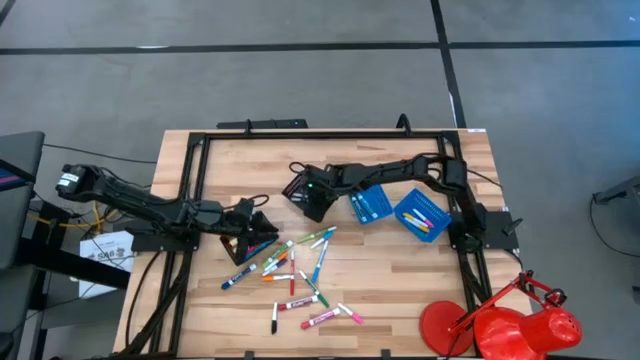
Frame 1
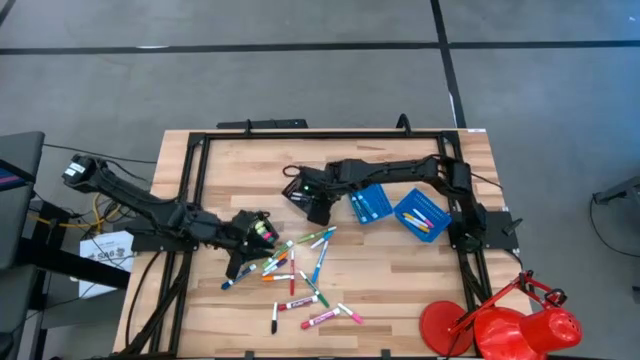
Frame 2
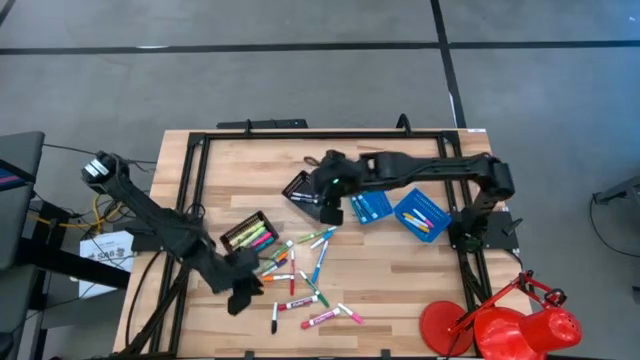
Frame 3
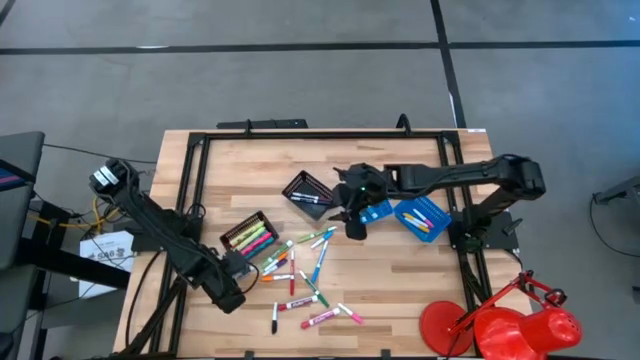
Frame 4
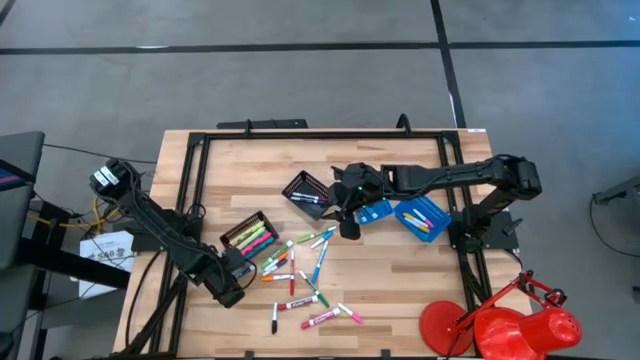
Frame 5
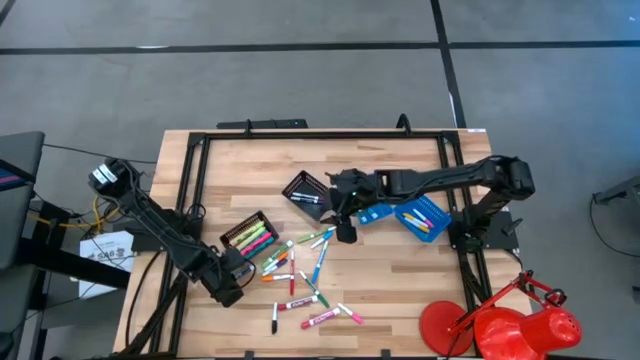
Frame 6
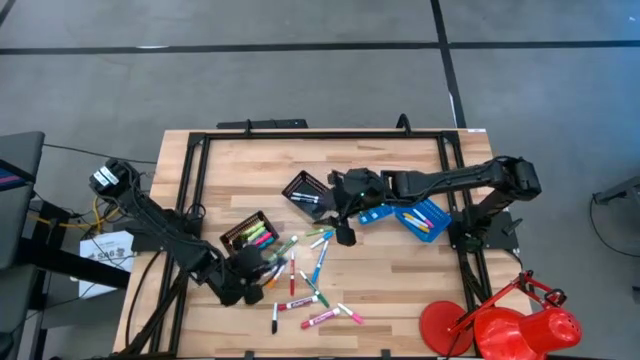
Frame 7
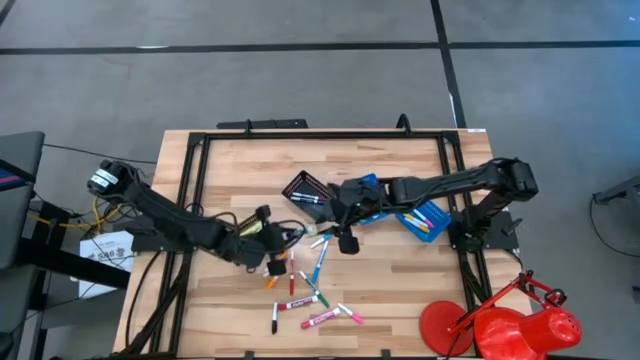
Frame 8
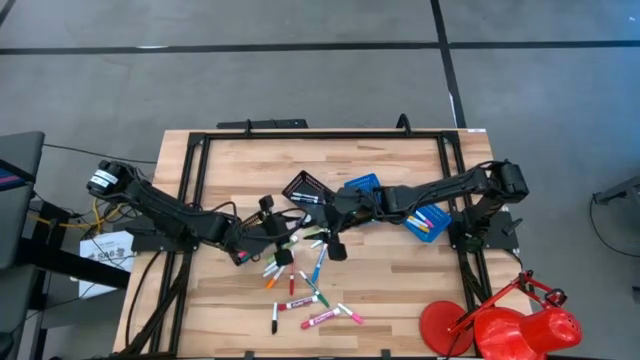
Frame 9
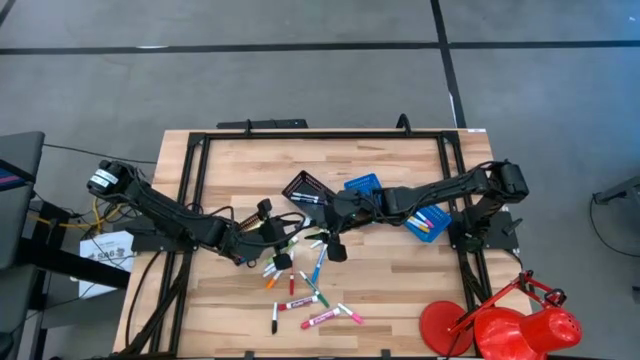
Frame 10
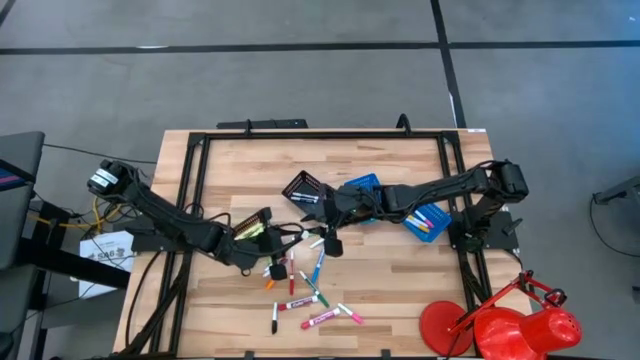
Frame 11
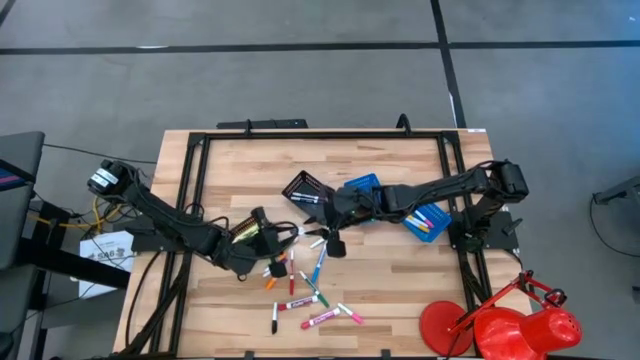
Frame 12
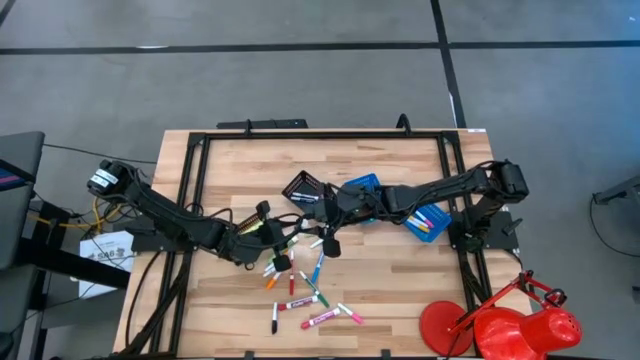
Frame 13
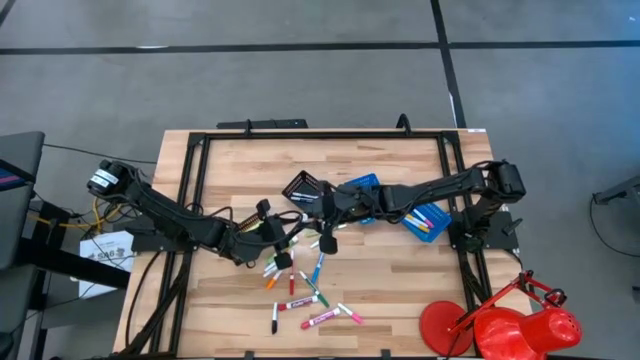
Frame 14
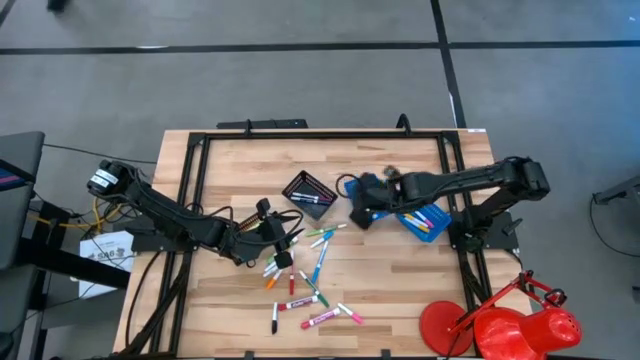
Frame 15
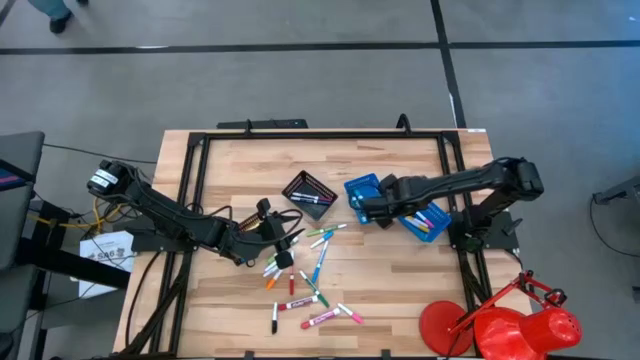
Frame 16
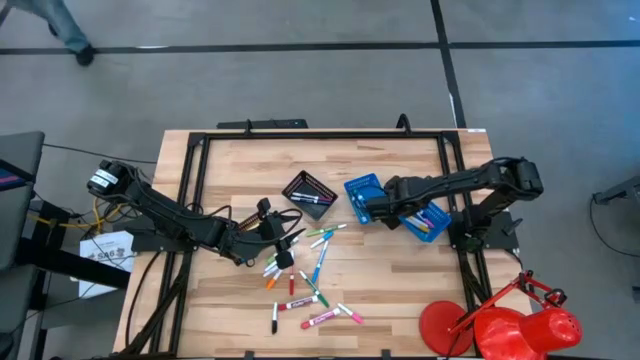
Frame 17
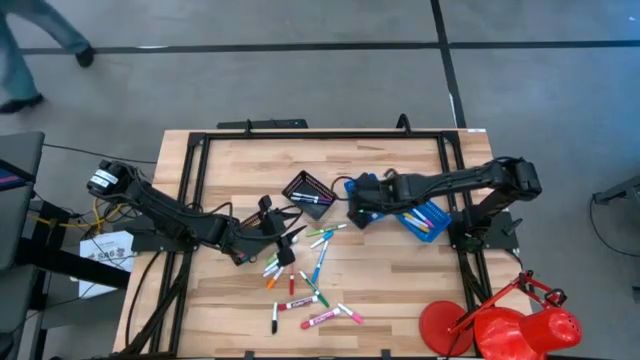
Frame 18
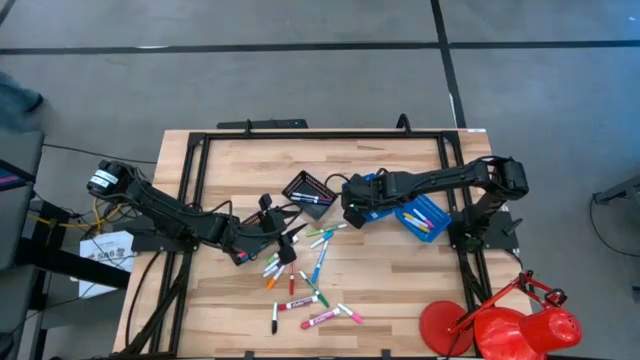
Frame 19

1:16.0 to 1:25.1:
Task: Pick & Place Markers
Put the large blue marker into the left blue bin

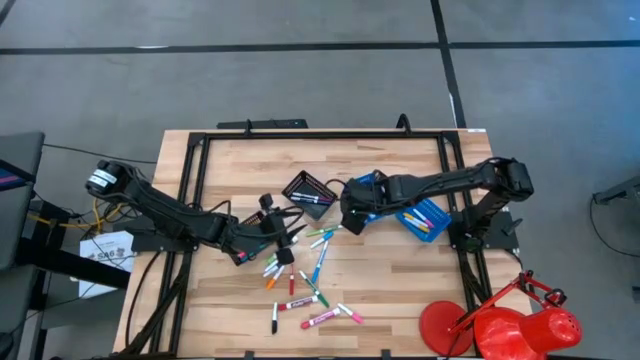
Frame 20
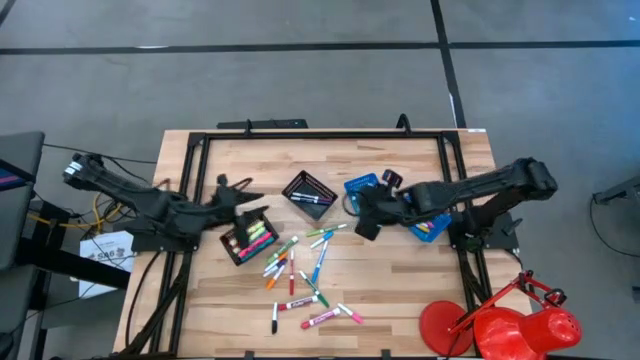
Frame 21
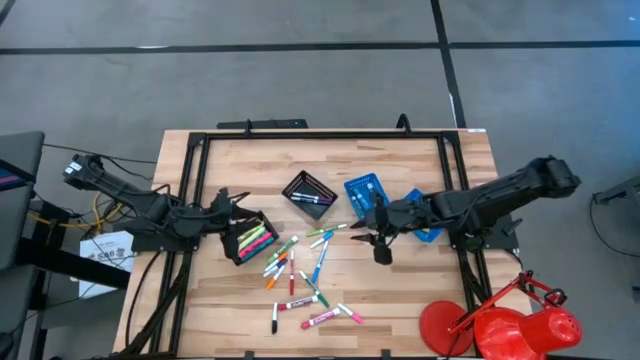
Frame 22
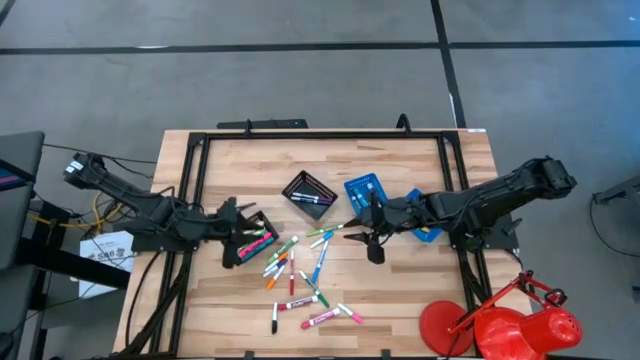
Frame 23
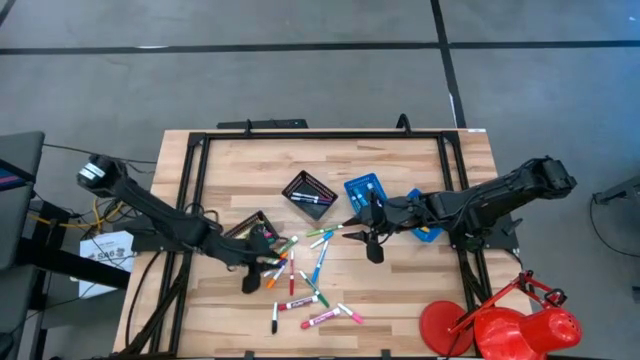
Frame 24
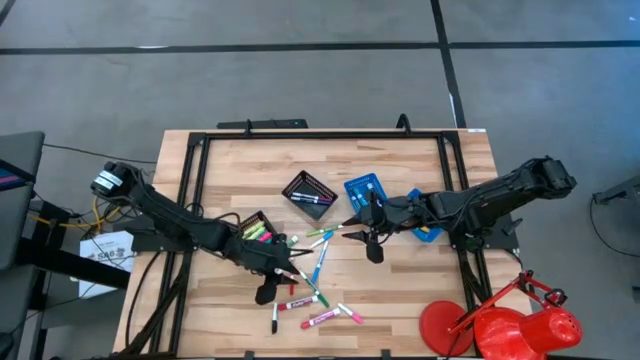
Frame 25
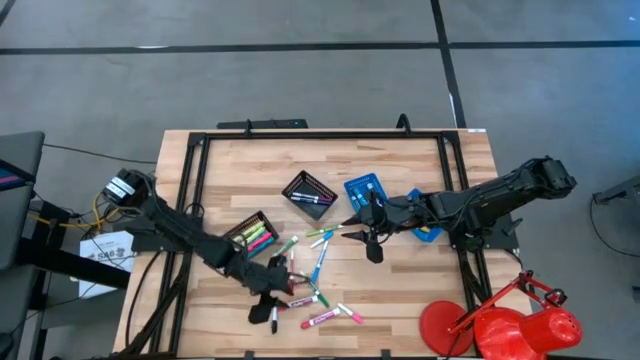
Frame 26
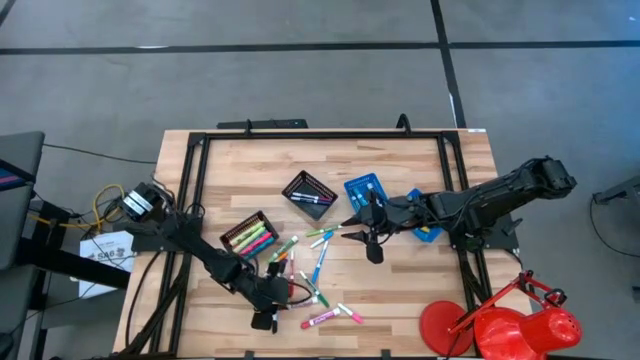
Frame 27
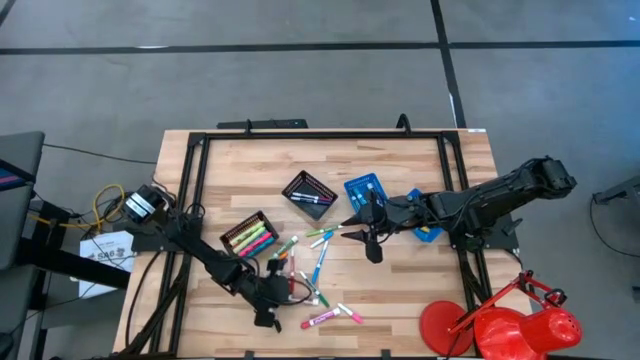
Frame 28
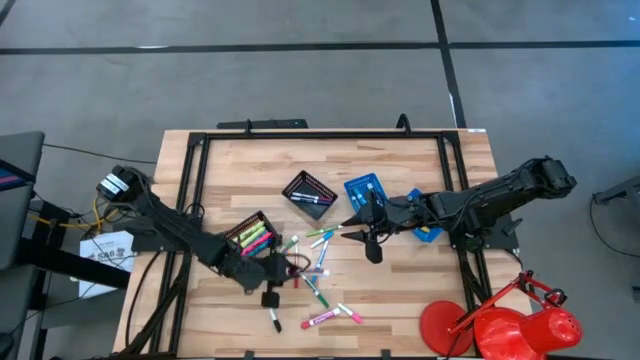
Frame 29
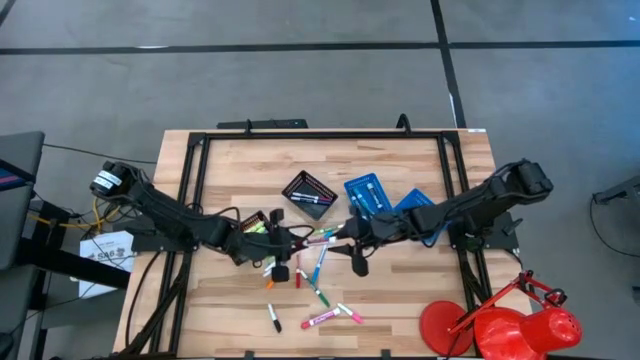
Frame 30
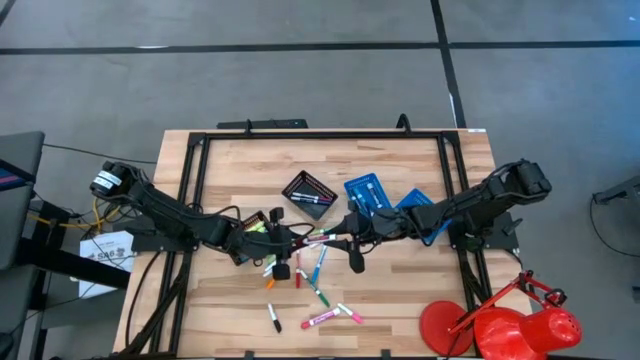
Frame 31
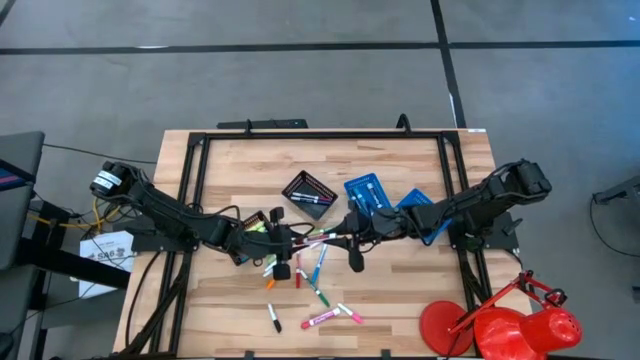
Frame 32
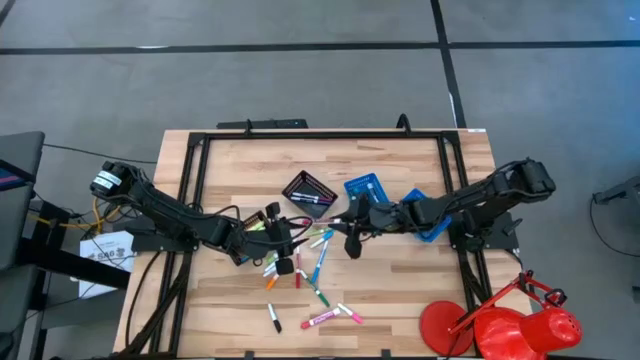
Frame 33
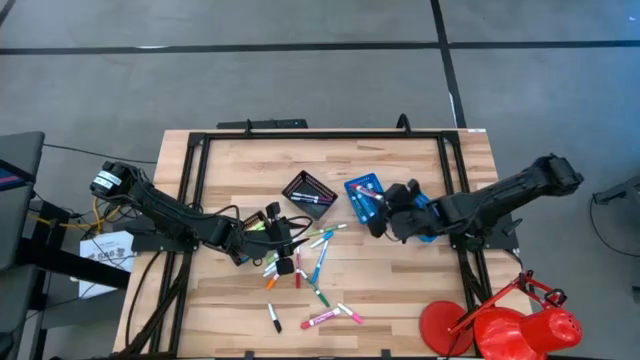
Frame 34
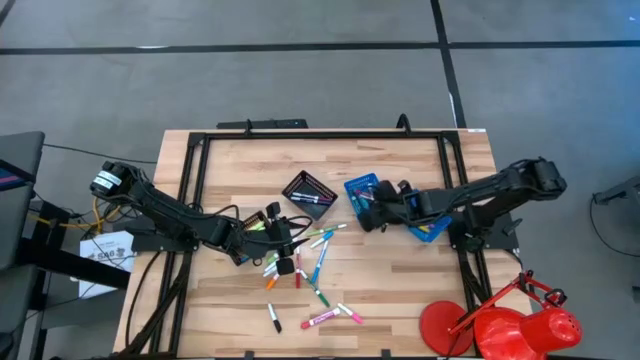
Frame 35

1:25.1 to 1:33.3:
Put the large red marker into the left blue bin

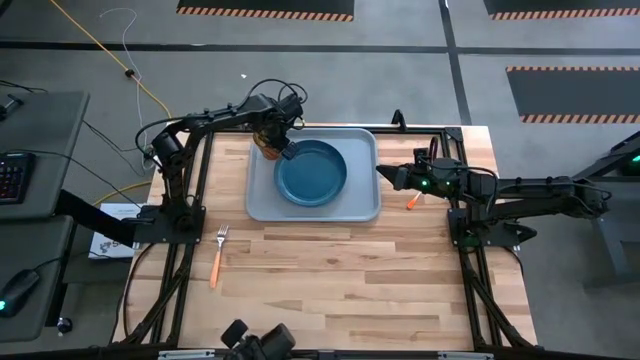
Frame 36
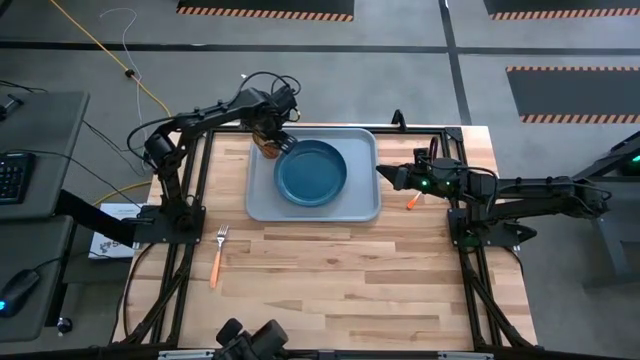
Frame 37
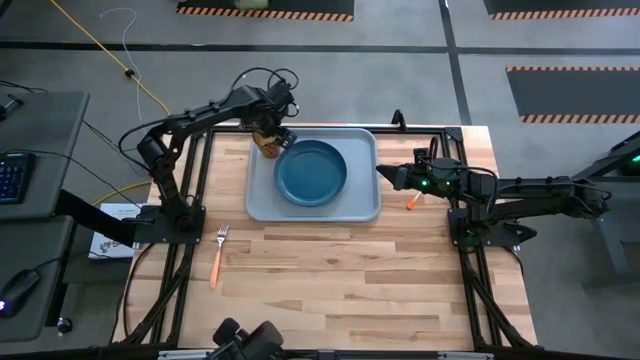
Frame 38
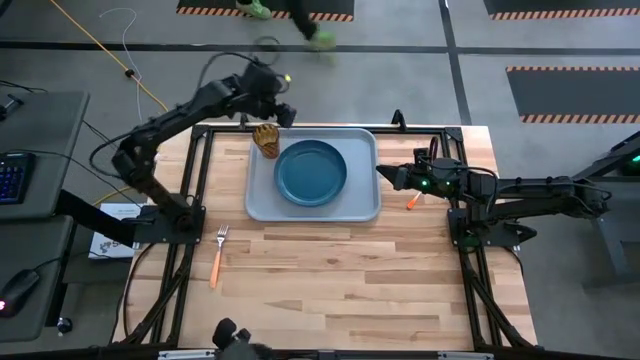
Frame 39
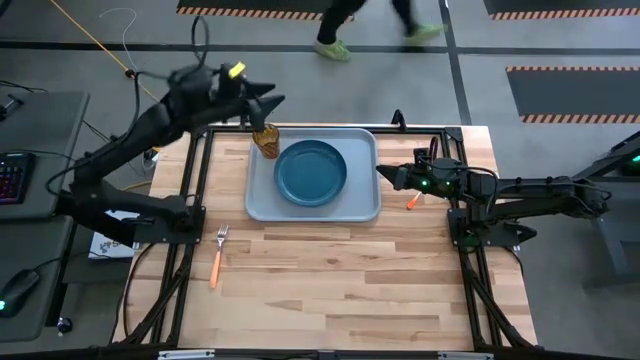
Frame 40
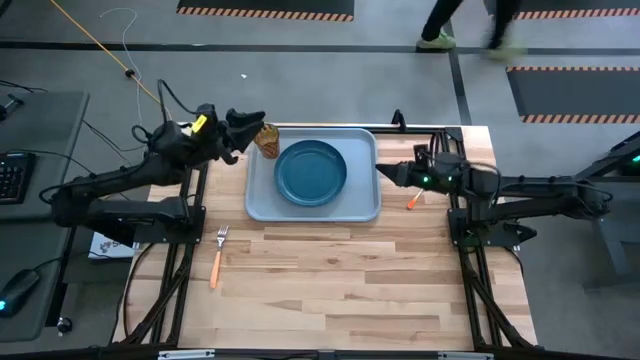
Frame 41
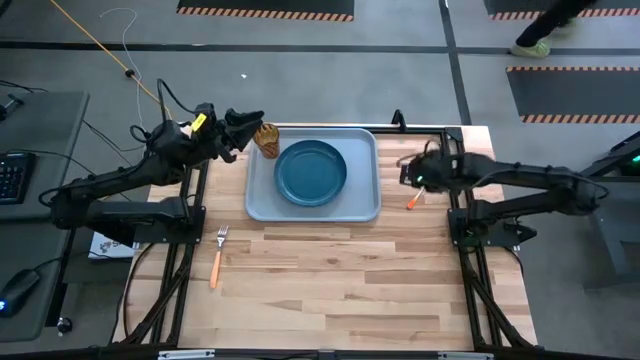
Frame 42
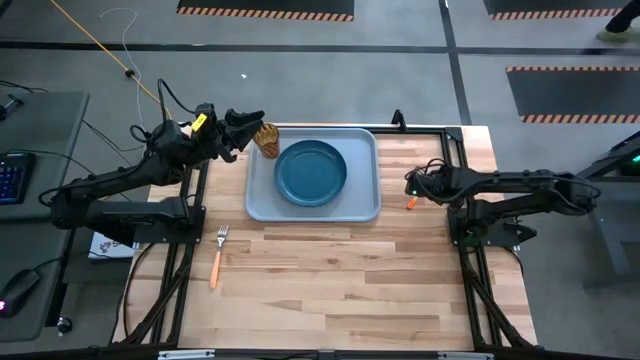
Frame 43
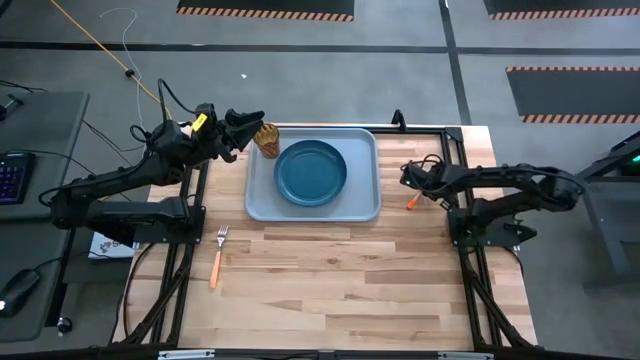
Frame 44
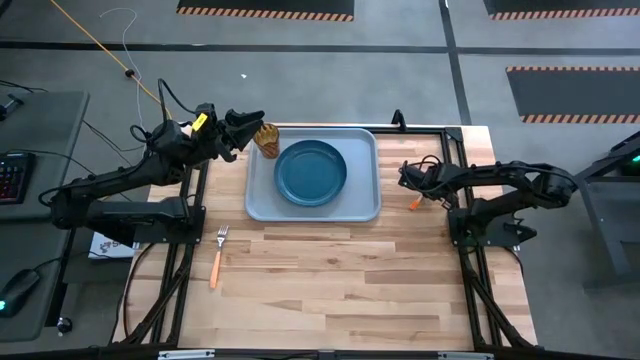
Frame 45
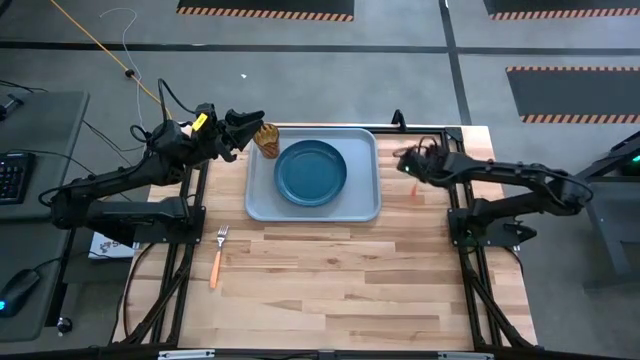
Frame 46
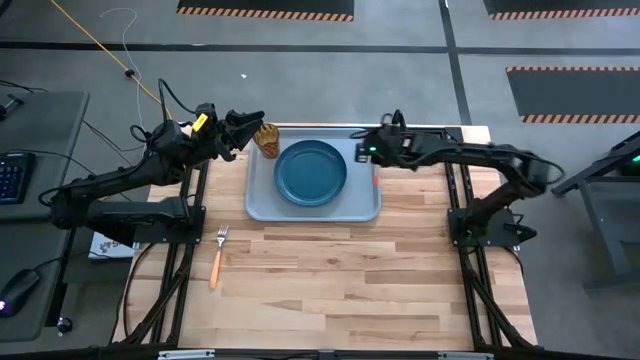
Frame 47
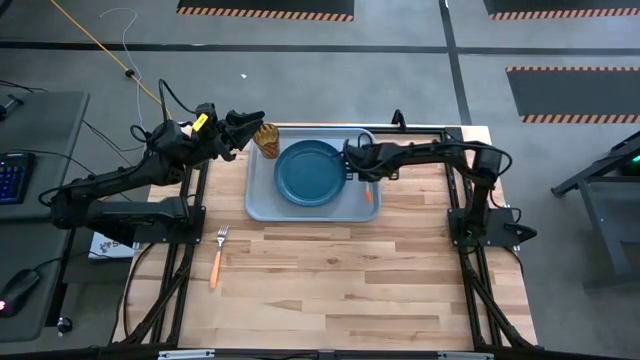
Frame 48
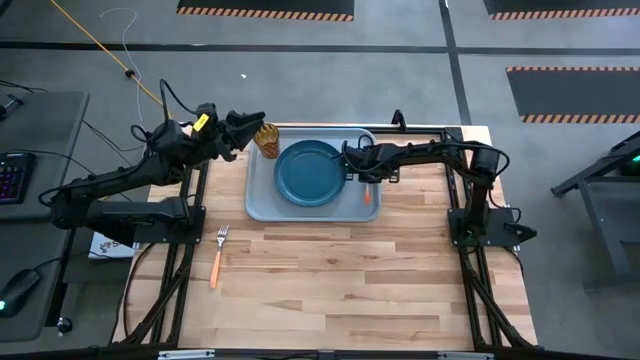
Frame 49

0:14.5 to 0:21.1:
Task: Pick and place plate/cup/fork/spoon on tray
Put the spoon on the right side of the tray
